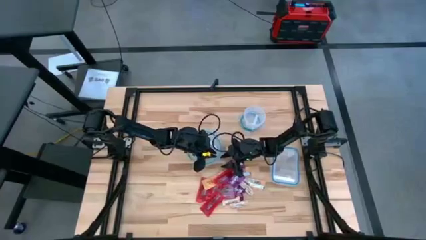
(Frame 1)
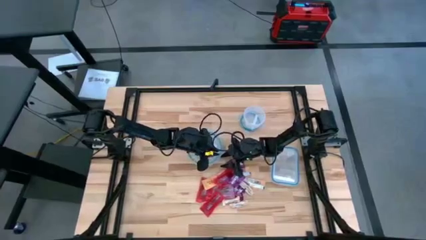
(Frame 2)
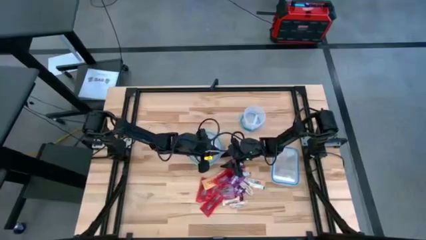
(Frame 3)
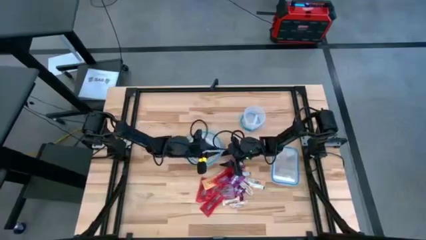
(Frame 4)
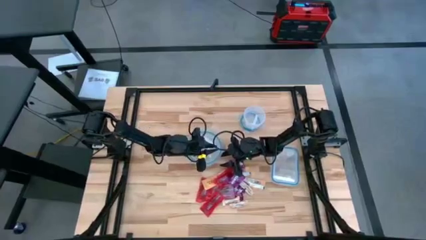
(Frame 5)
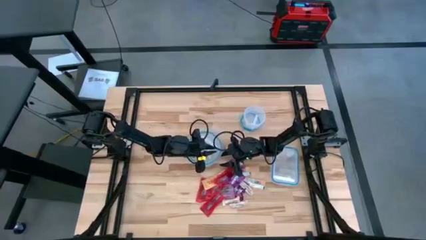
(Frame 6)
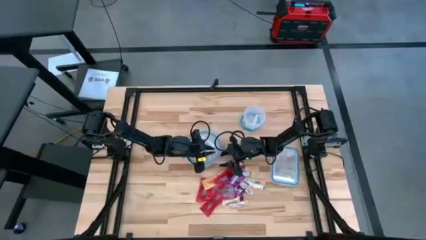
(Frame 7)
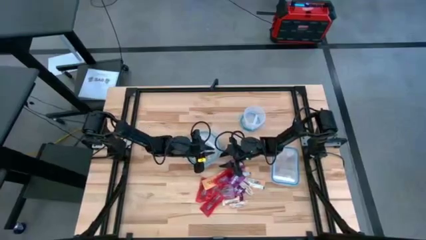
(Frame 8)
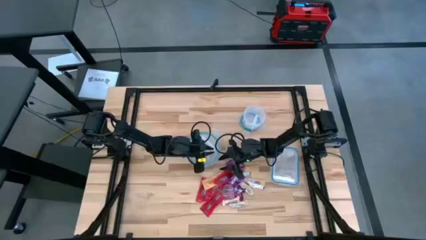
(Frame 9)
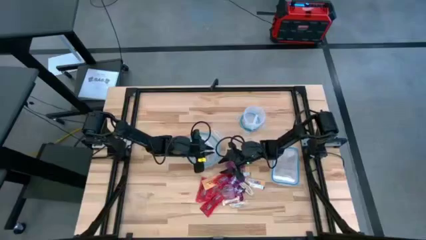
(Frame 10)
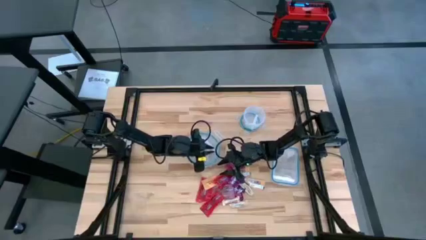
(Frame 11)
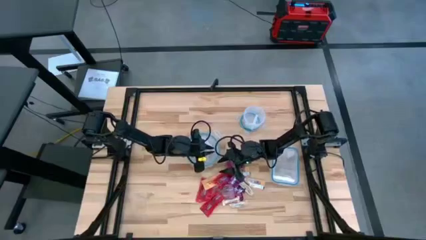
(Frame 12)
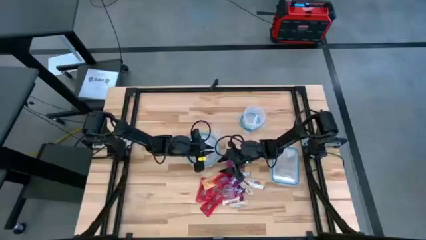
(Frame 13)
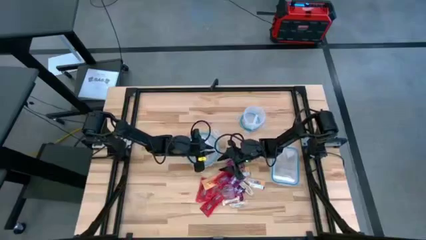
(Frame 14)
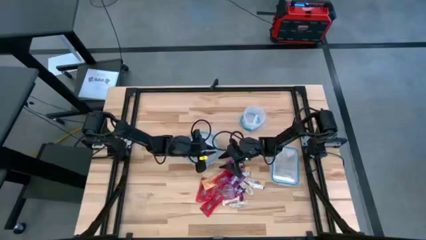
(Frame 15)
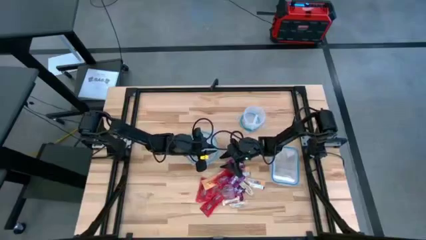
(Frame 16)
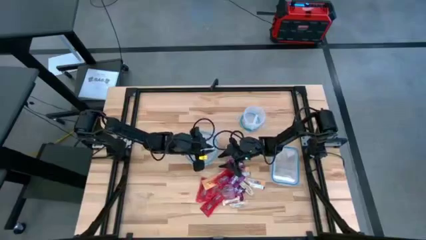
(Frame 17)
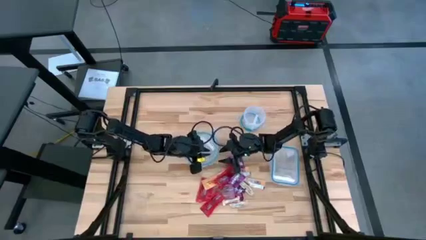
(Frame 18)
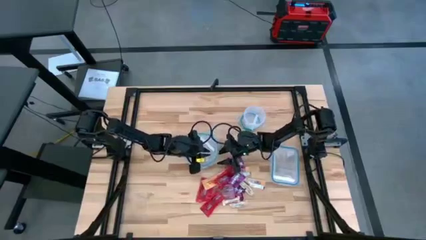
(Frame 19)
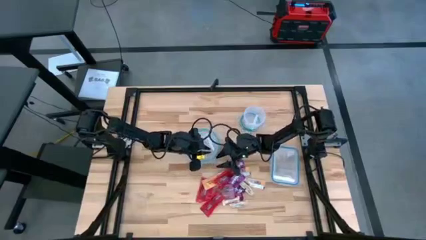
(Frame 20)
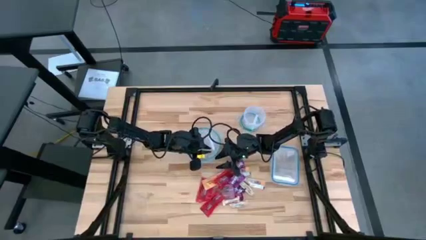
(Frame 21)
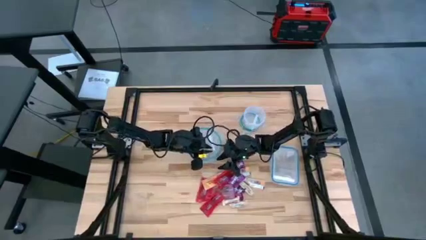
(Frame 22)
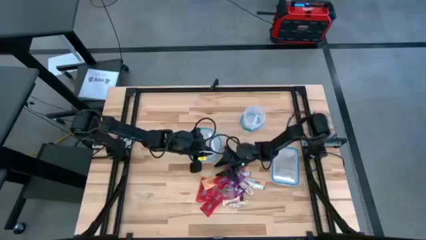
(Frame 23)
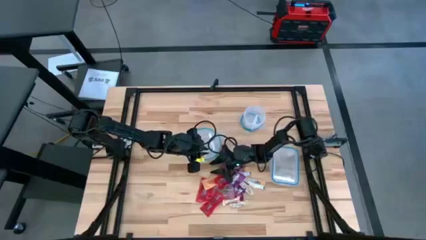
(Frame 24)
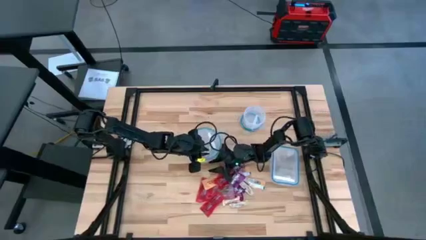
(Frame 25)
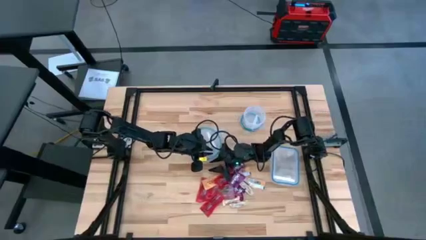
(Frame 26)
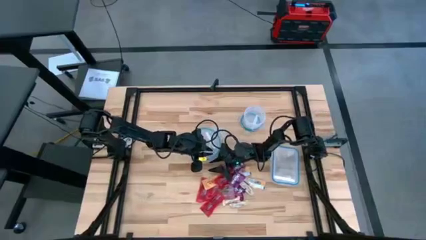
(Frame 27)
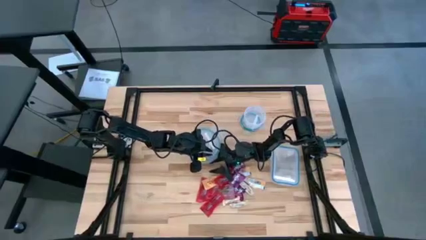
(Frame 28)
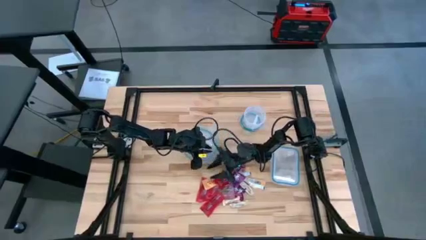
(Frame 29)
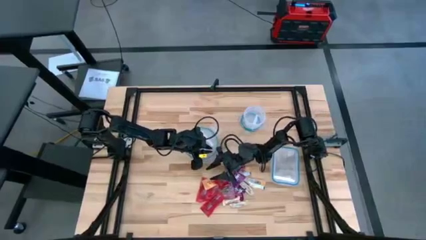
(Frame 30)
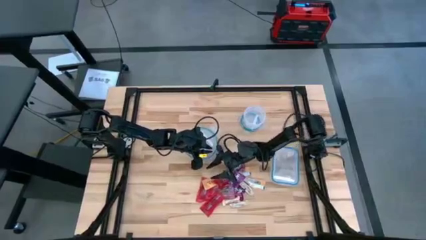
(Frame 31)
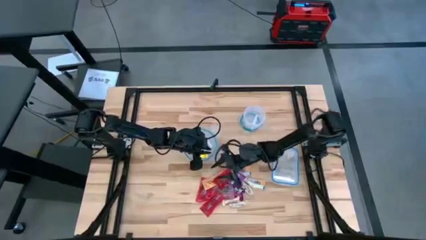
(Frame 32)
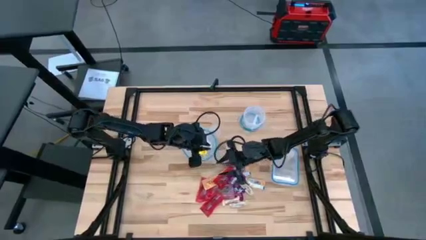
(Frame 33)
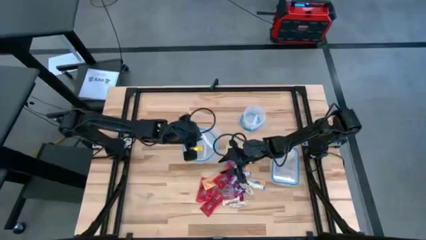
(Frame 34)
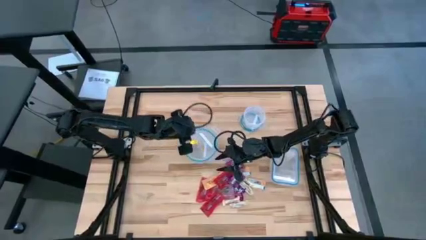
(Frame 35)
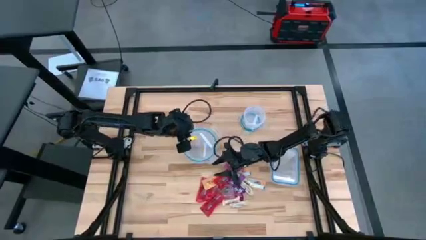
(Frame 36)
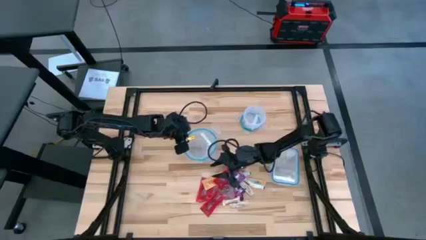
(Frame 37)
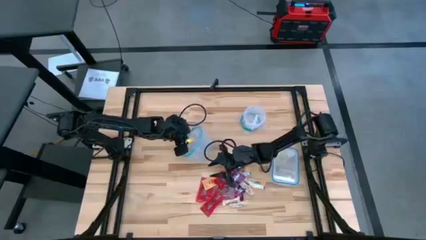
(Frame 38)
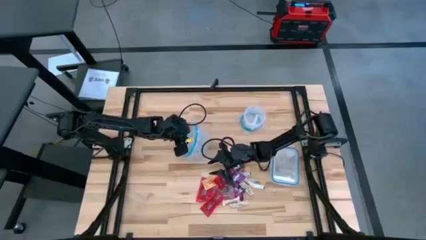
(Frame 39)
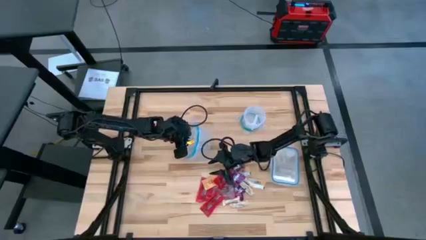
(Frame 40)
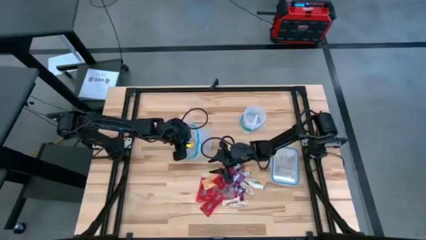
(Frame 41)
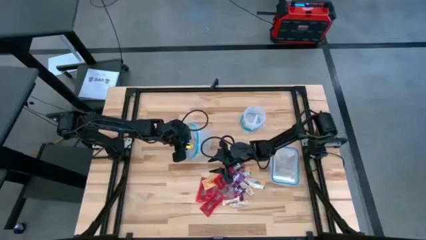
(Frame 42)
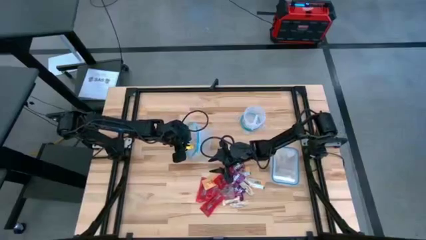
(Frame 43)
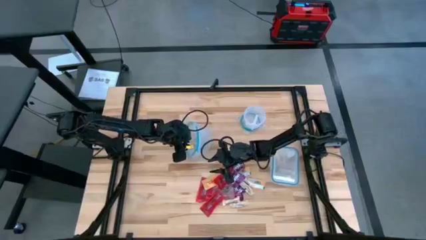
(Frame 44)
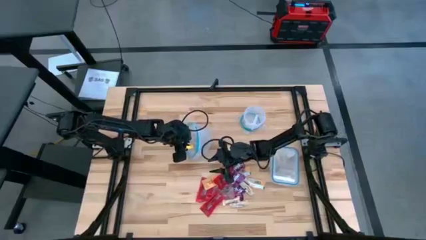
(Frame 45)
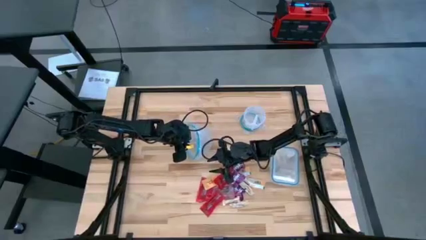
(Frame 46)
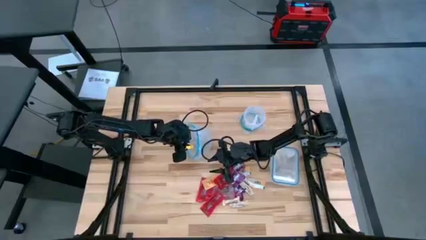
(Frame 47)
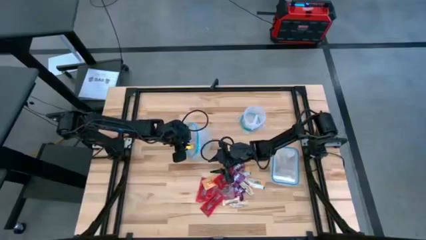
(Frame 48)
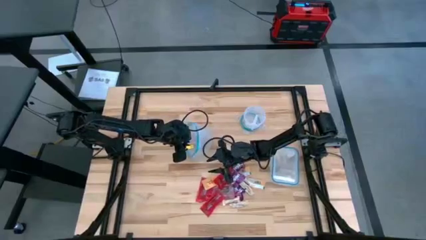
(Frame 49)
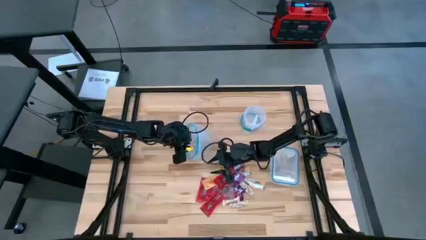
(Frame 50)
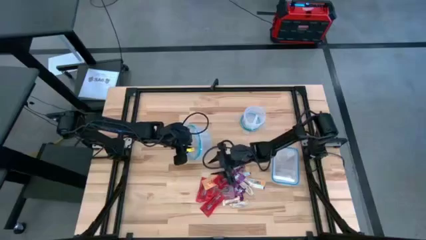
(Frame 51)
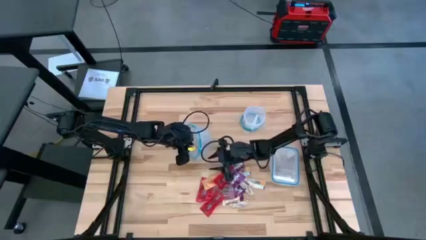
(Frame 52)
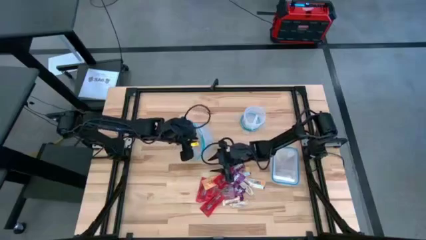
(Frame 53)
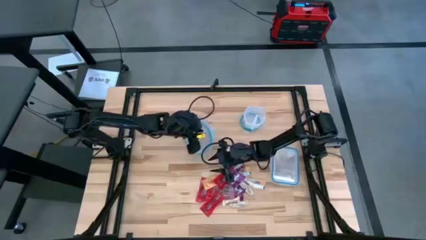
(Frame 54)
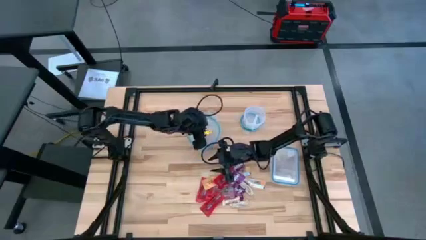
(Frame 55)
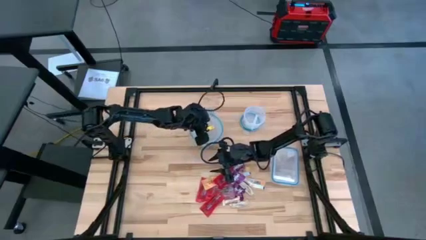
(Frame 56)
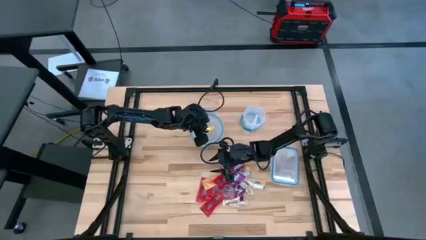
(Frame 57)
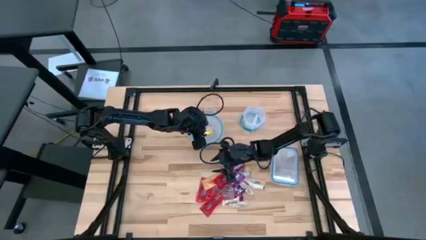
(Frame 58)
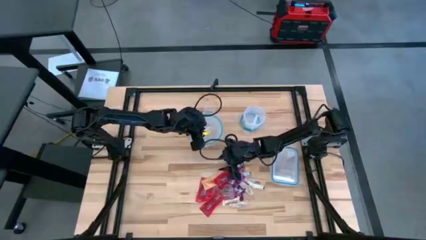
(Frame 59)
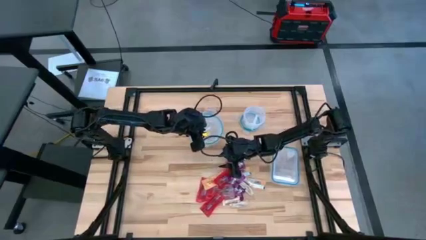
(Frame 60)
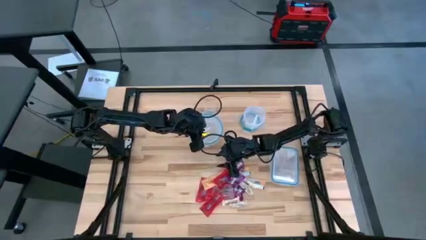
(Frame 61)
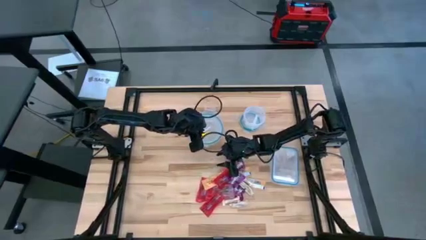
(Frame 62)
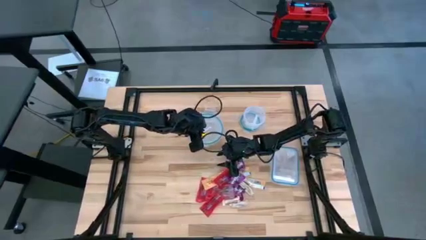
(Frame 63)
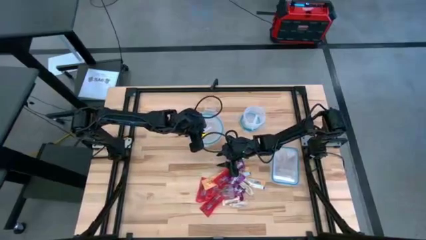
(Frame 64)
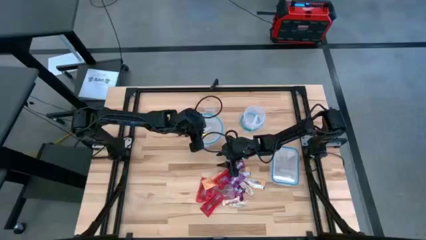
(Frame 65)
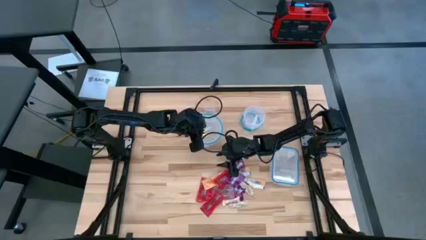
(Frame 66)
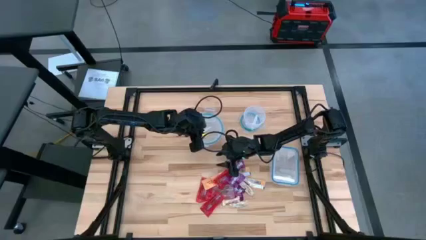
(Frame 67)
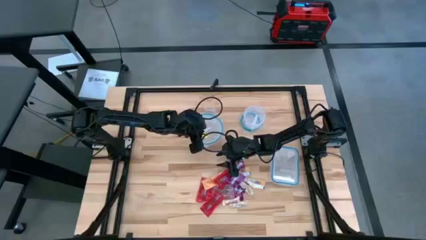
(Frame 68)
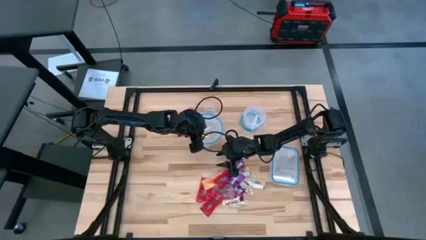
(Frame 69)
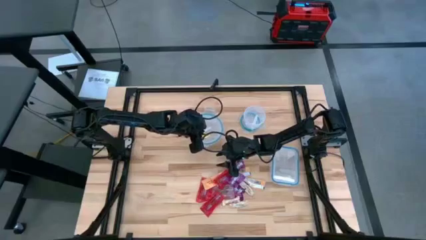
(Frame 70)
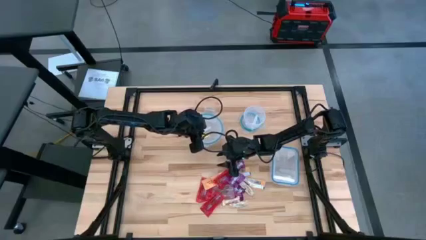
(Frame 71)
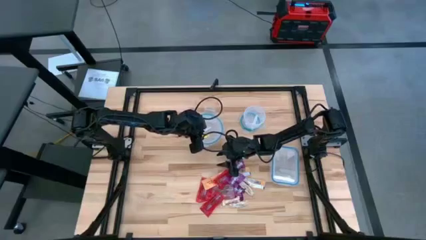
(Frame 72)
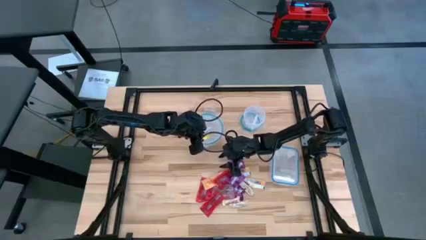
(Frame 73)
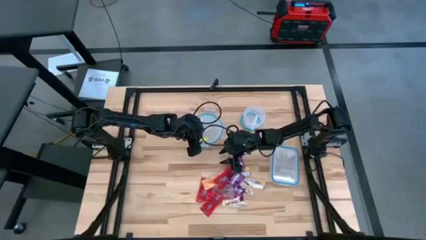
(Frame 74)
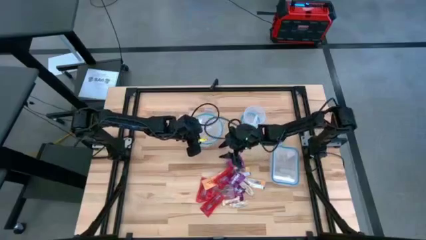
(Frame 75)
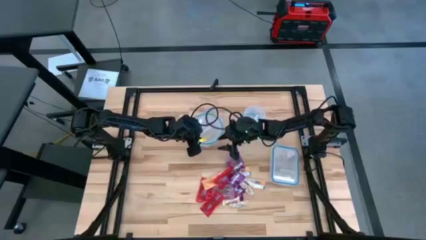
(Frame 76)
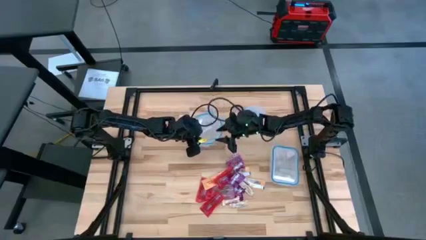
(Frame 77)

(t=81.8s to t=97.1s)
Task: Sort candy
Open the big circular transparent bin
